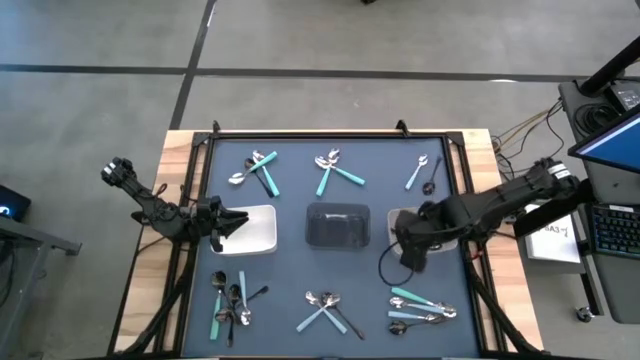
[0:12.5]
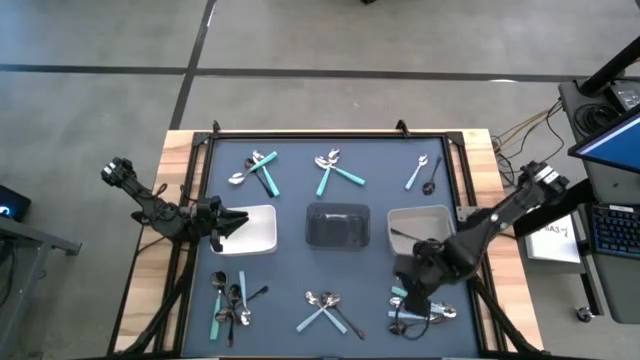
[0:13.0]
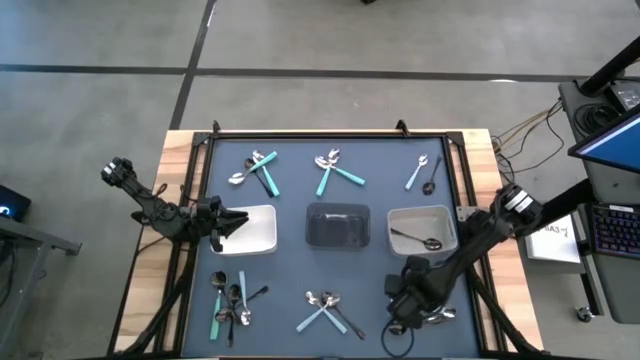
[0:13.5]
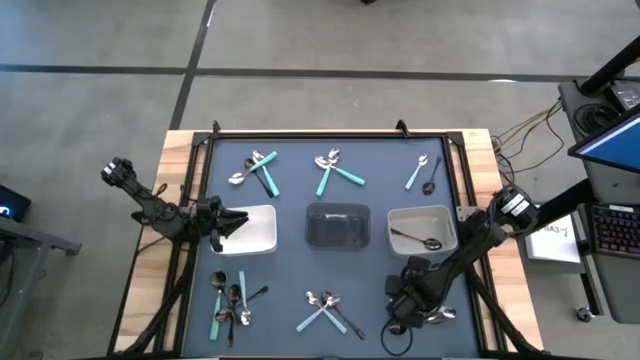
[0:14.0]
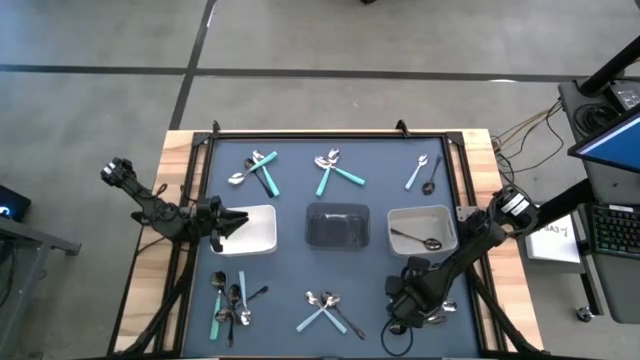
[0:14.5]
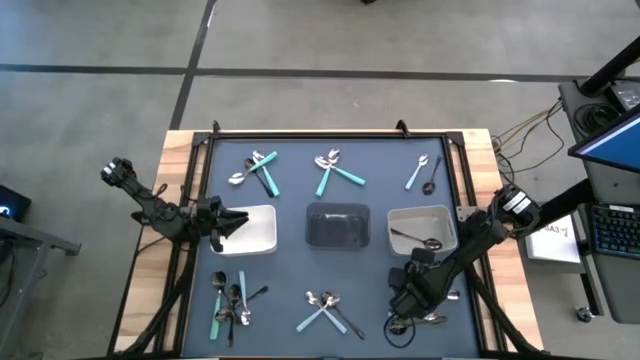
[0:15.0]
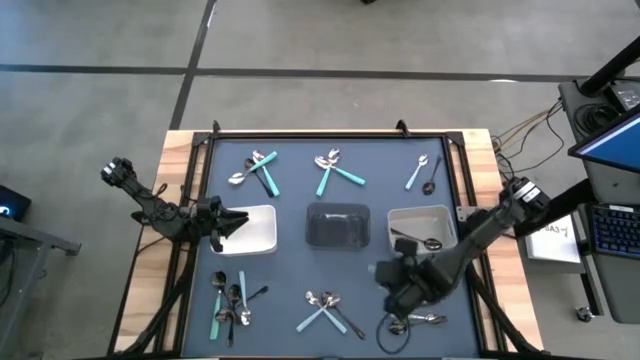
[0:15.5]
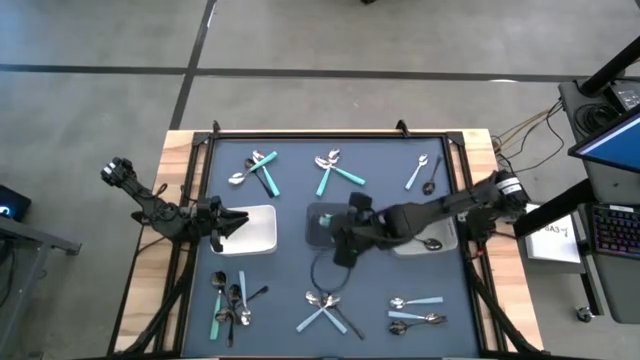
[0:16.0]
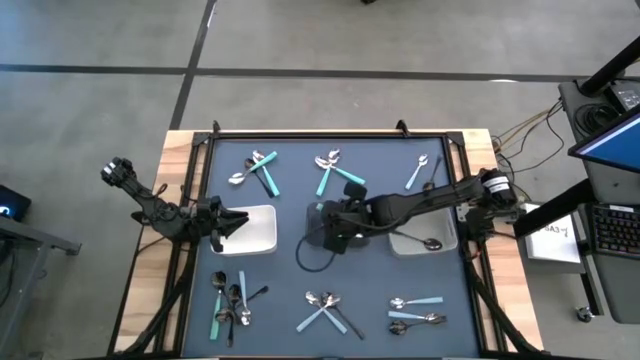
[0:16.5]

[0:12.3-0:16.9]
Task: Sort silverware by color (type)
Put the green spoon into the transparent black bin

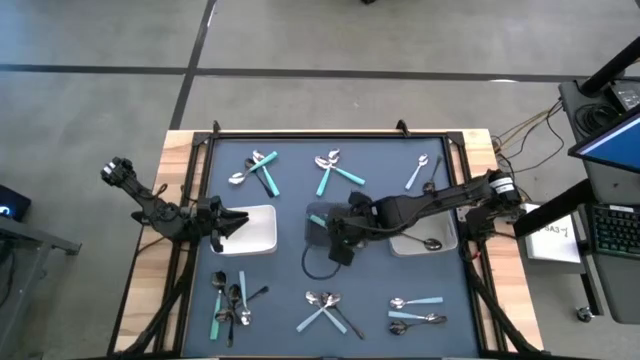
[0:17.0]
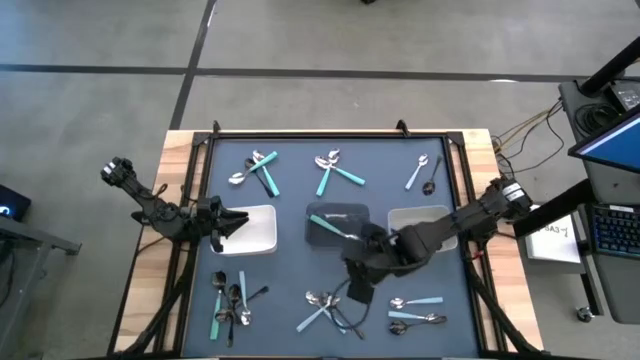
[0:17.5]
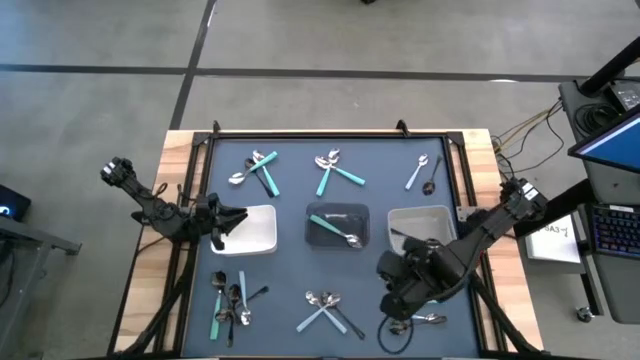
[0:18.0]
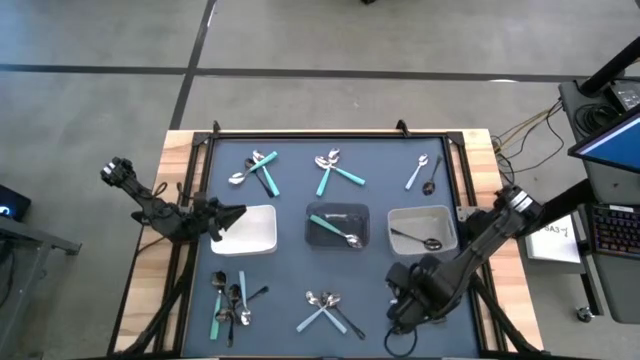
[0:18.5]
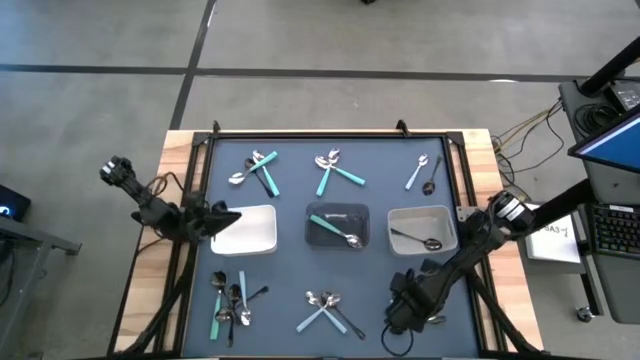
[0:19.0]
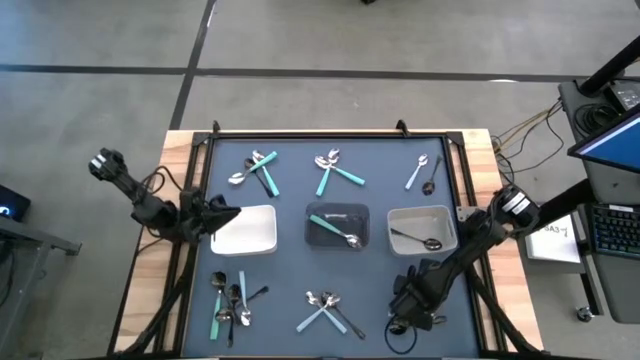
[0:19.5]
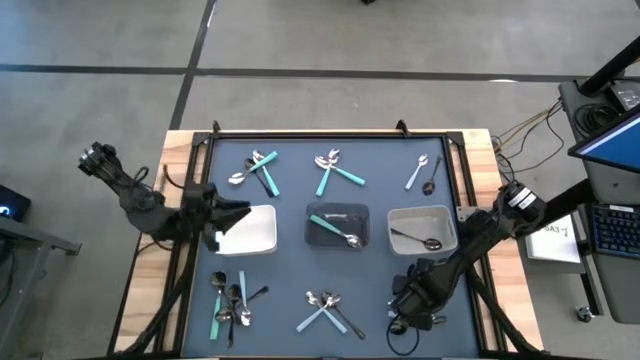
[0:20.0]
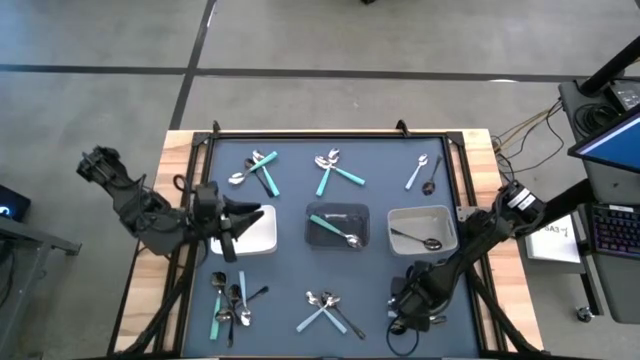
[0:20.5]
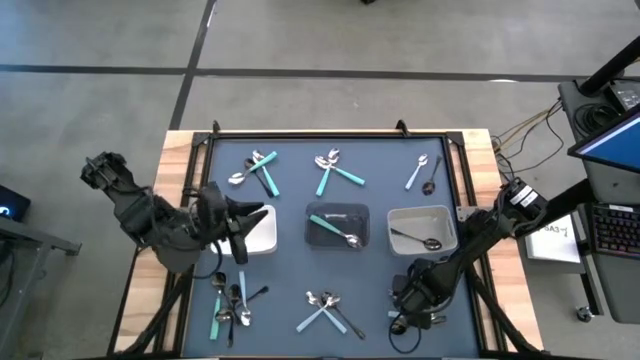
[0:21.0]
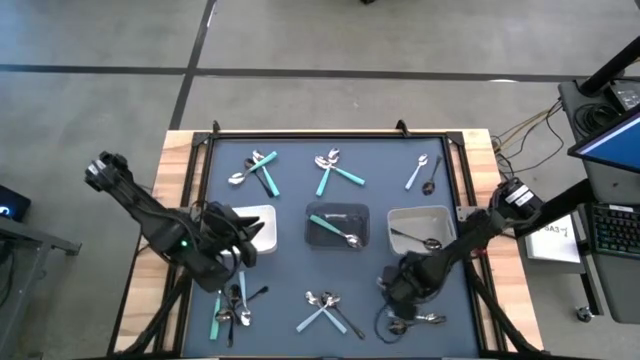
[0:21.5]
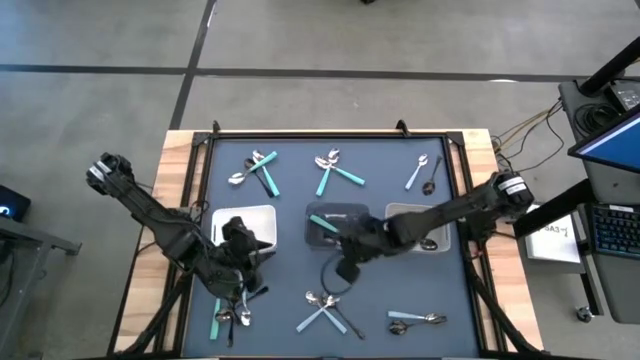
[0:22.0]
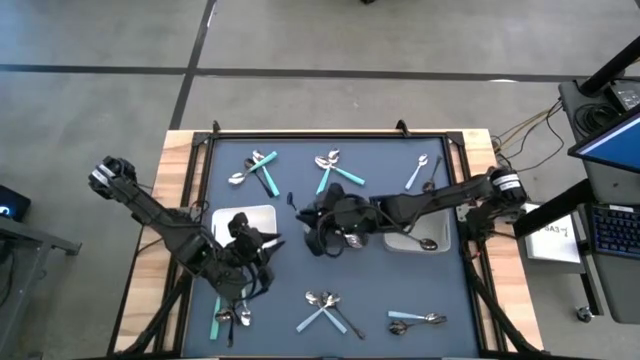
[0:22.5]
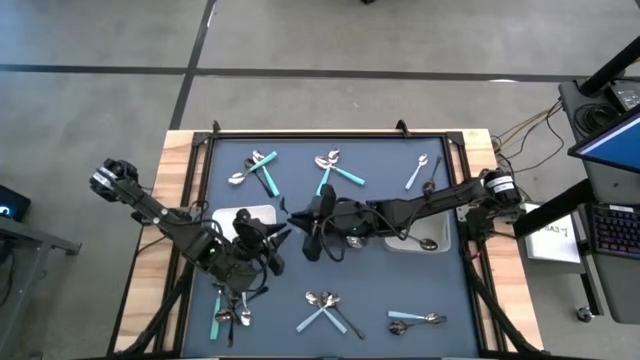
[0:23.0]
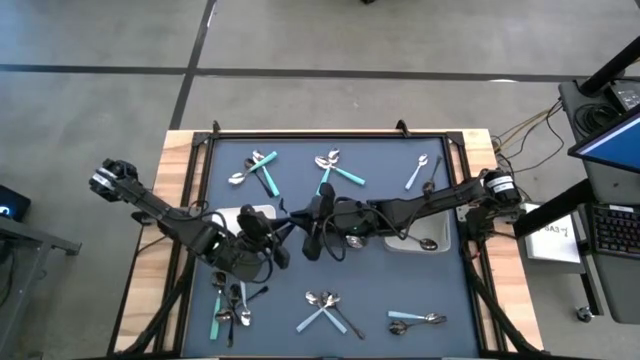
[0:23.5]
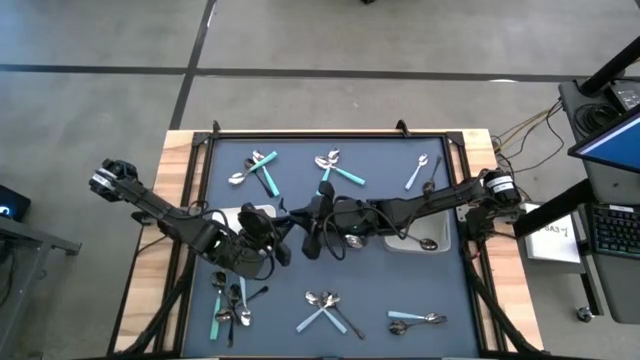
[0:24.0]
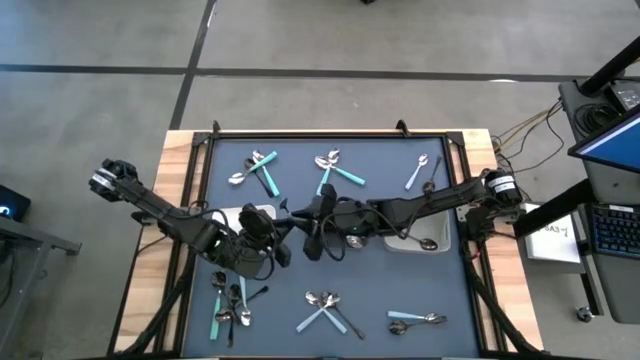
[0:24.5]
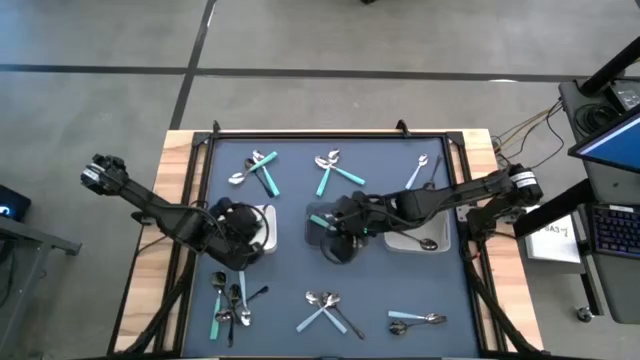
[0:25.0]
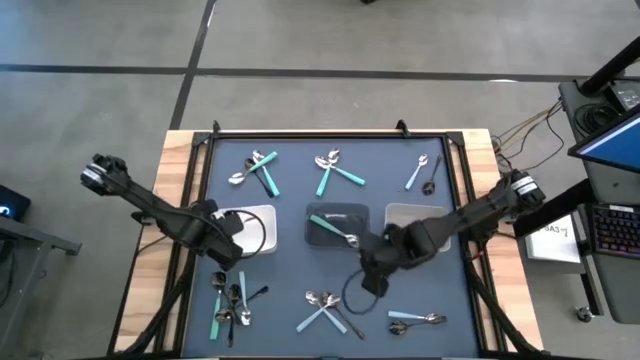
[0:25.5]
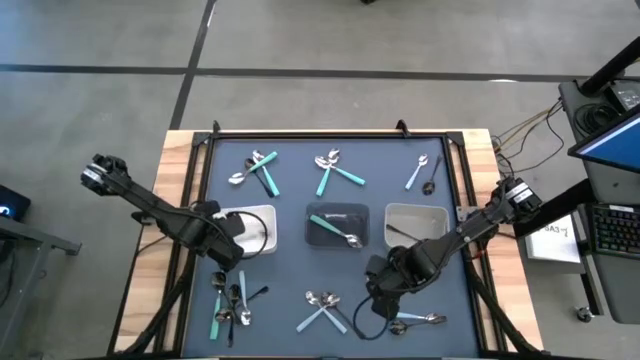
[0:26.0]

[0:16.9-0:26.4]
Put the light blue spoon into the white bin

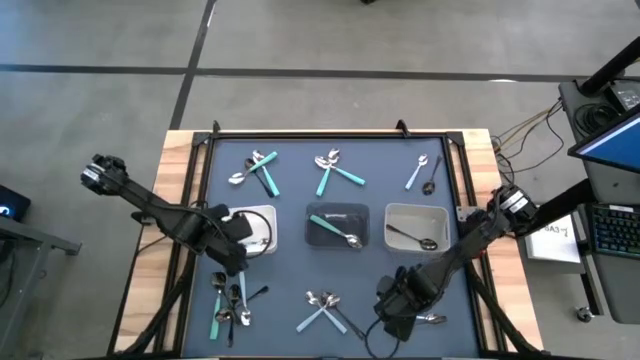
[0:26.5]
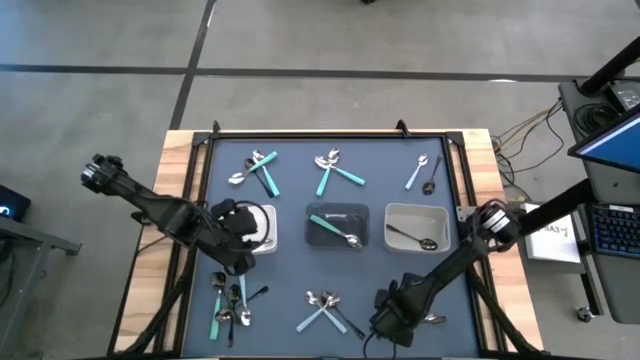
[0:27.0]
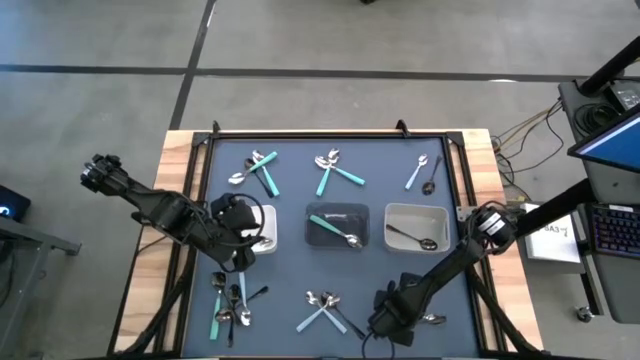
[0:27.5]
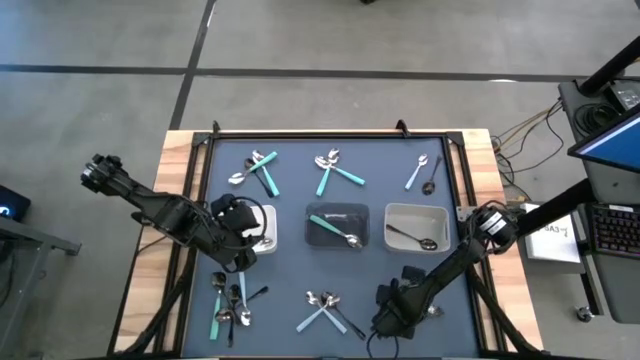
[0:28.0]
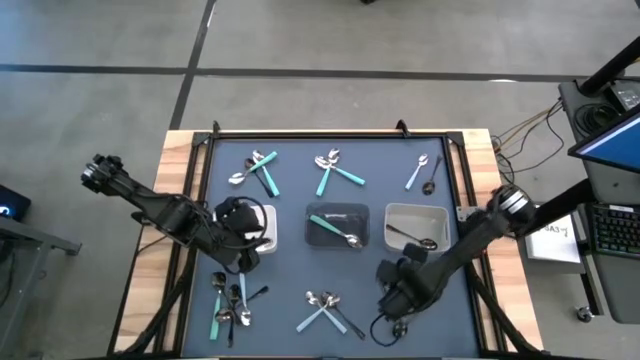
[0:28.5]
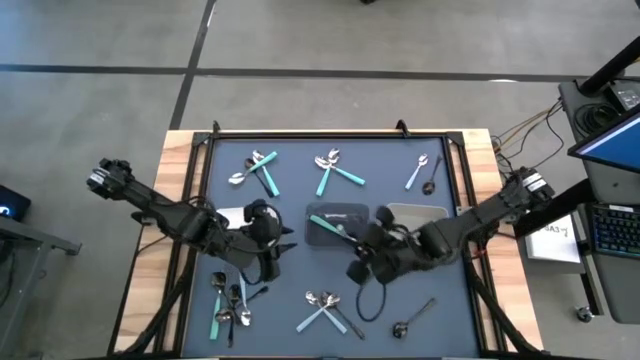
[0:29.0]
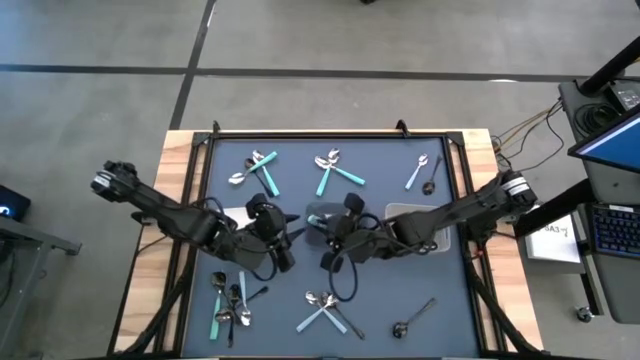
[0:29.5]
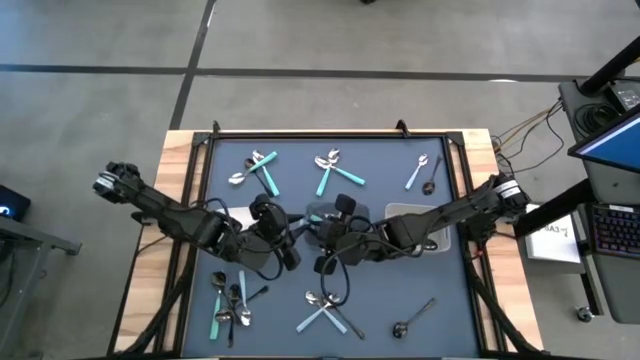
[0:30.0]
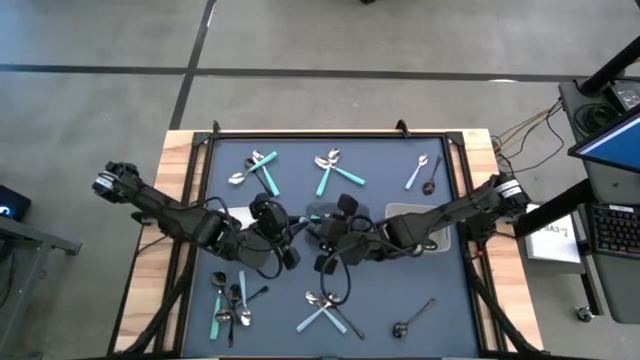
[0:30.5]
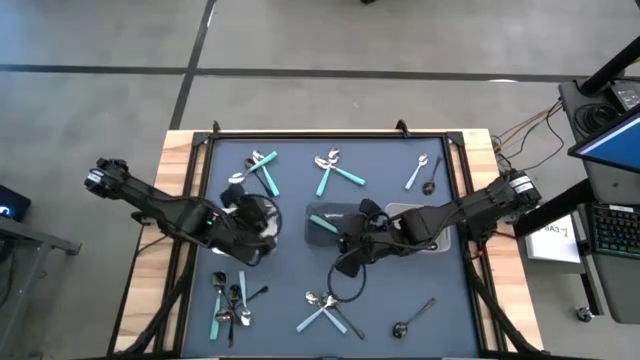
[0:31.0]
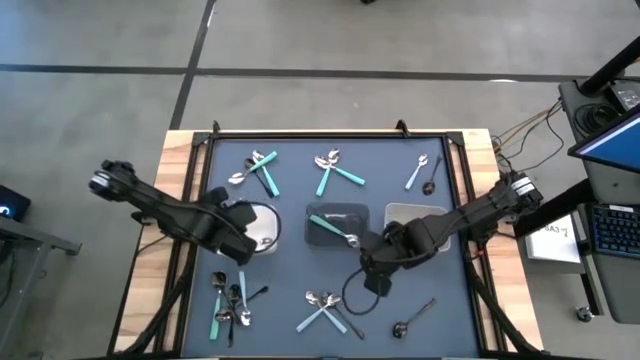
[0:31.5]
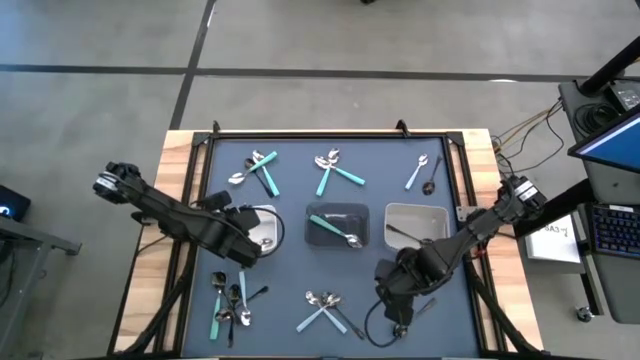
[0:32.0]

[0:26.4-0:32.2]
Put the light blue spoon into the white bin

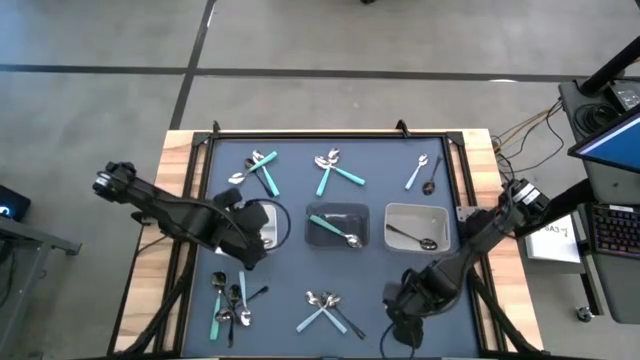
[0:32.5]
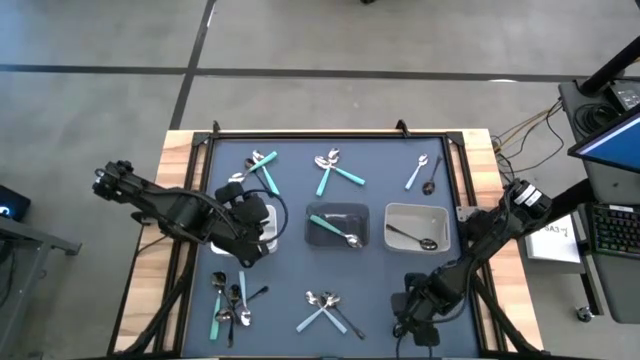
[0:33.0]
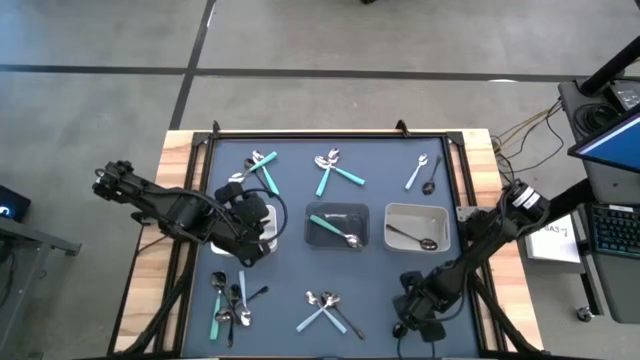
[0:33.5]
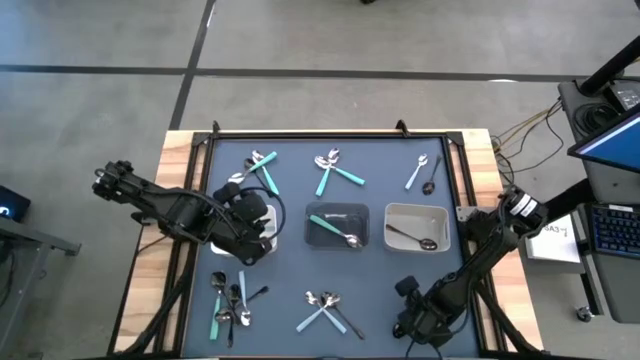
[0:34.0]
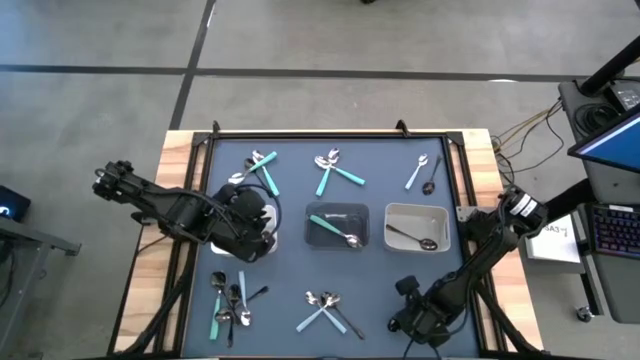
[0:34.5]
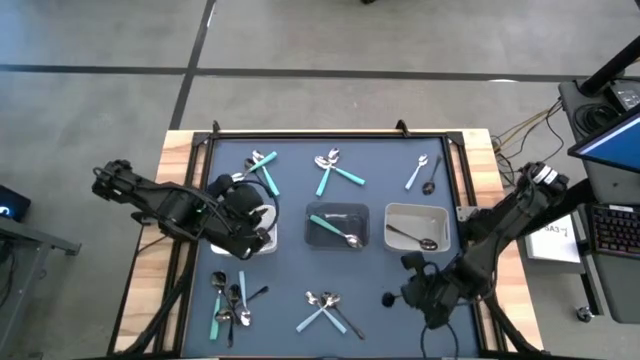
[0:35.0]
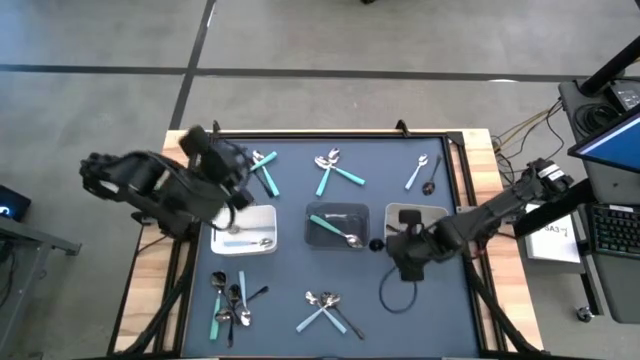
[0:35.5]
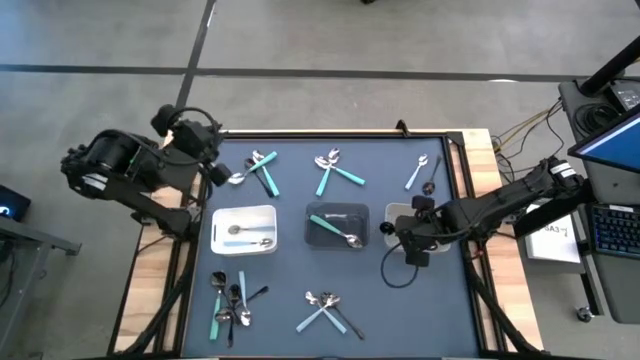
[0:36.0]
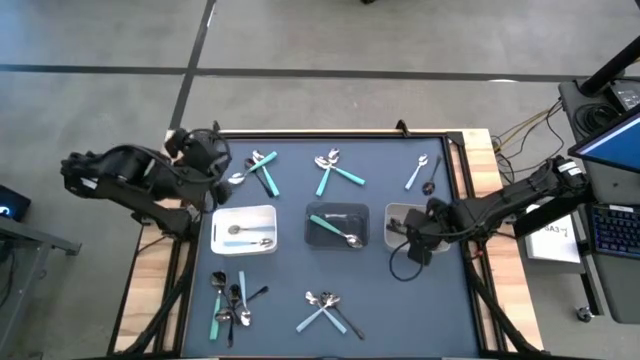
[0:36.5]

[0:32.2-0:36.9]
Put the black spoon into the gray bin
